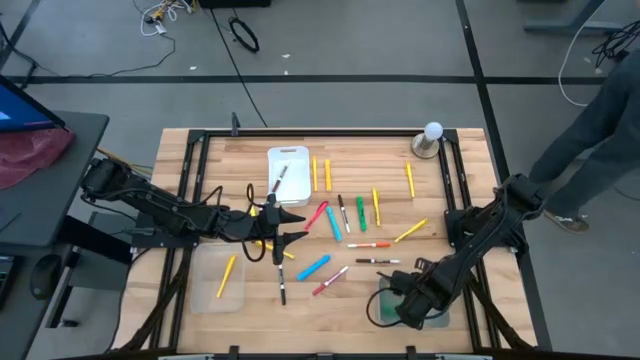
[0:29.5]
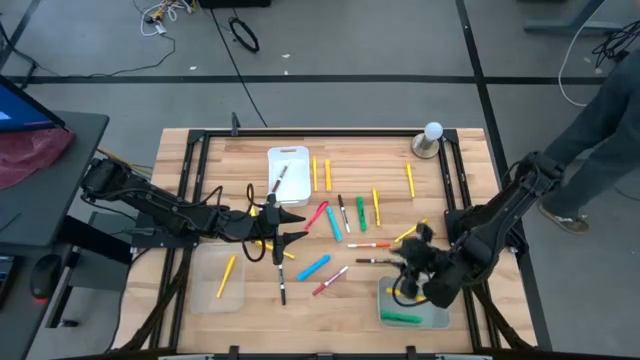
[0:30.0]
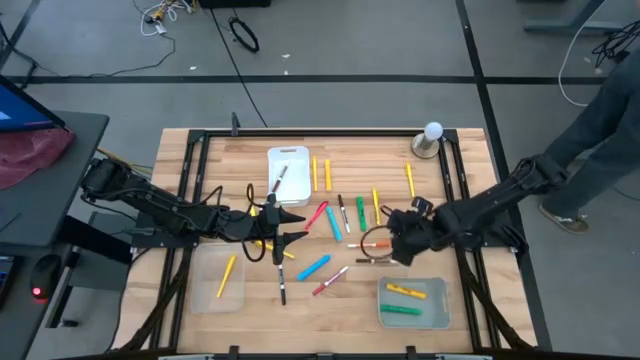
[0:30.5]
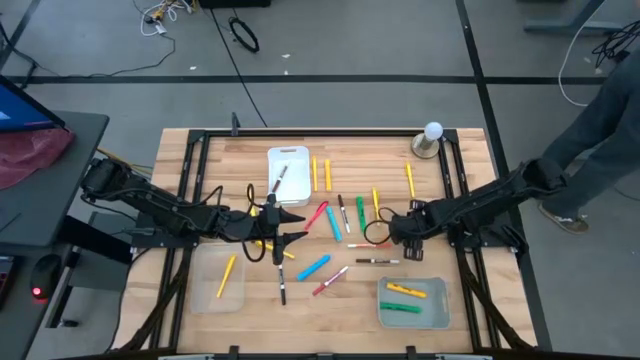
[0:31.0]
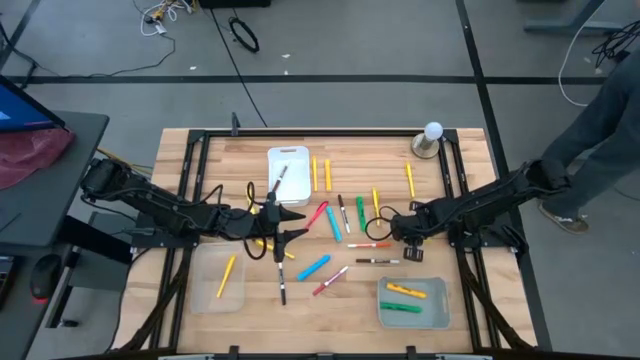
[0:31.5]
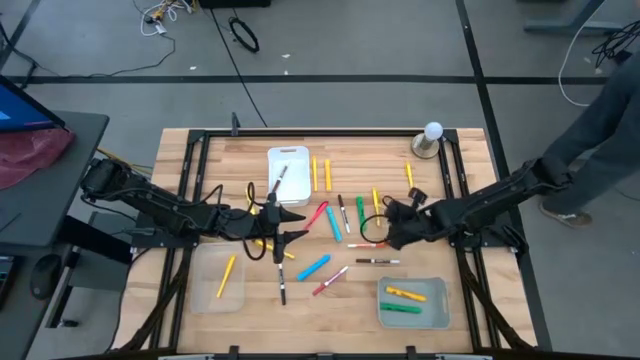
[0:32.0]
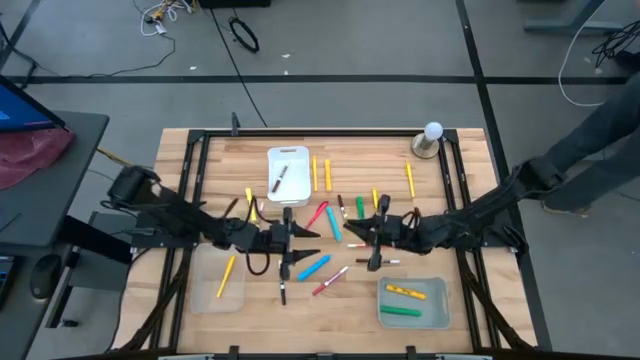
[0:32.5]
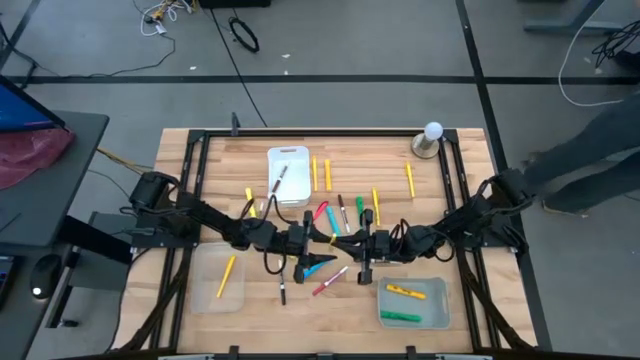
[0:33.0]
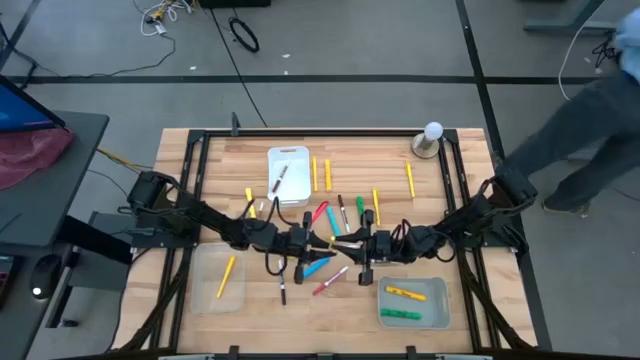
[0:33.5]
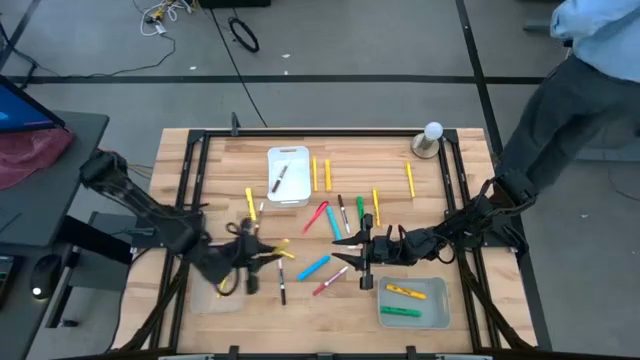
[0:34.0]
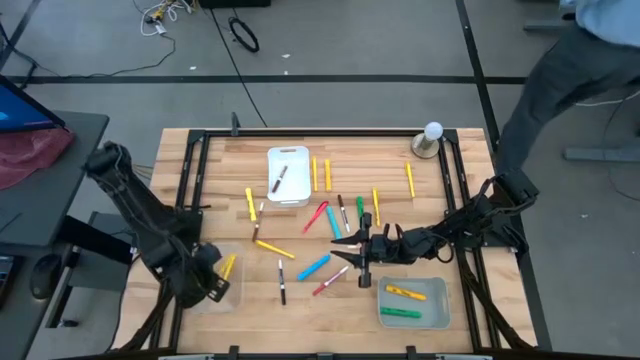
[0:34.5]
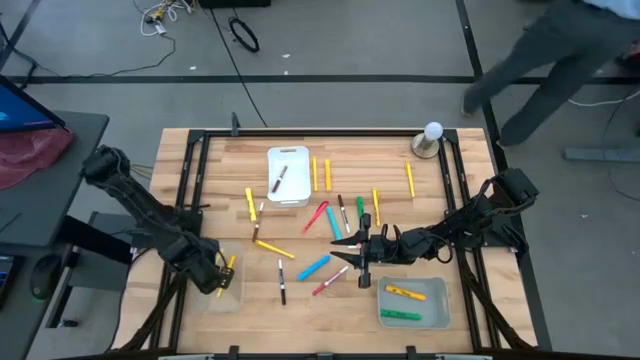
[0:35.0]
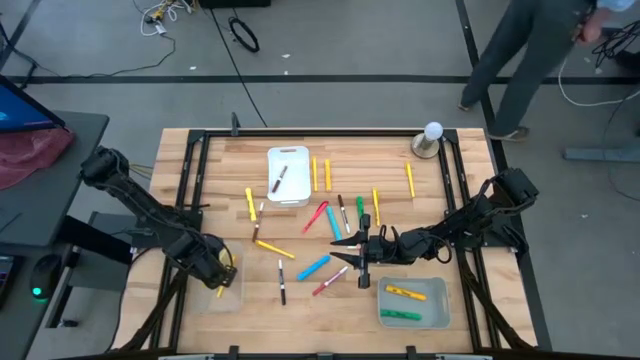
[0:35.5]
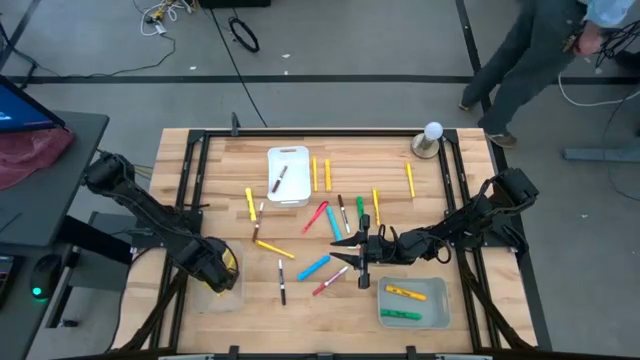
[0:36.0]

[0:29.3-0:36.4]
Task: Pick & Place Markers
Put the yellow pen into the transparent bin

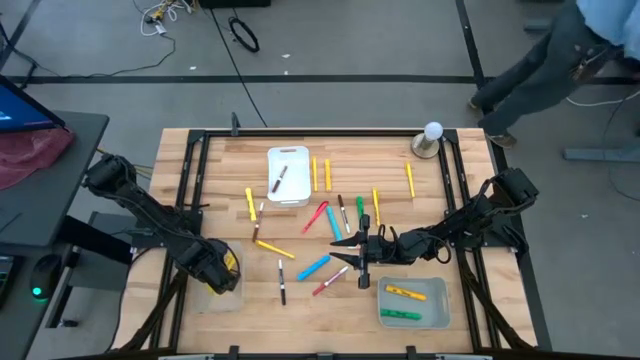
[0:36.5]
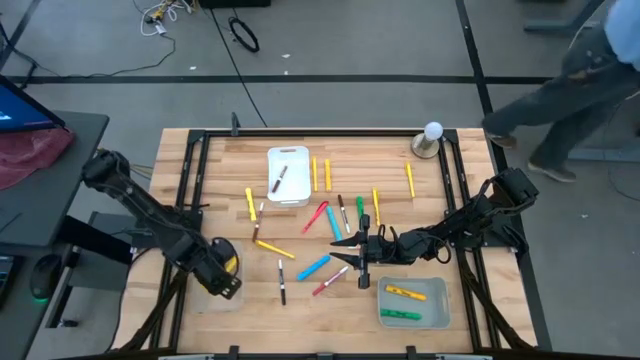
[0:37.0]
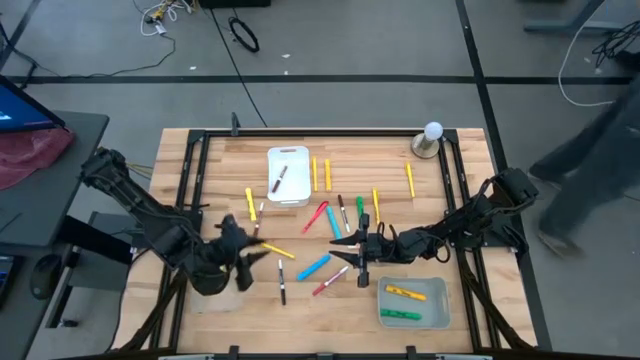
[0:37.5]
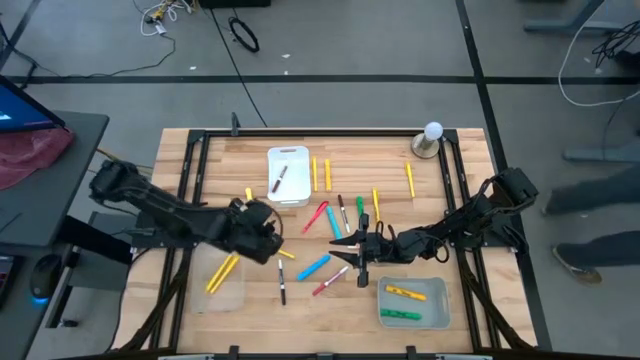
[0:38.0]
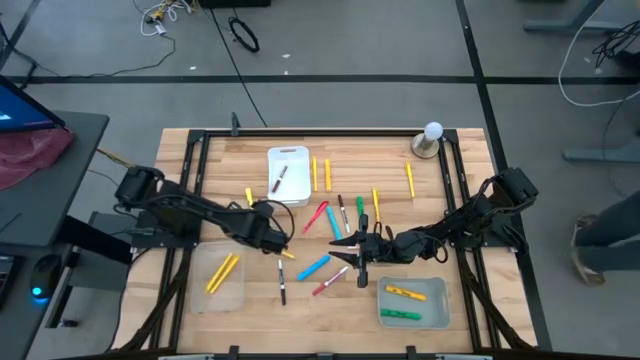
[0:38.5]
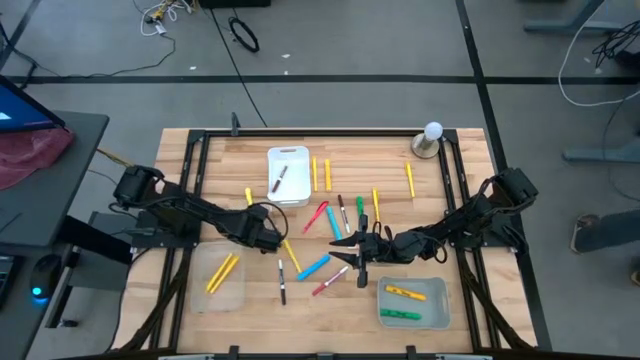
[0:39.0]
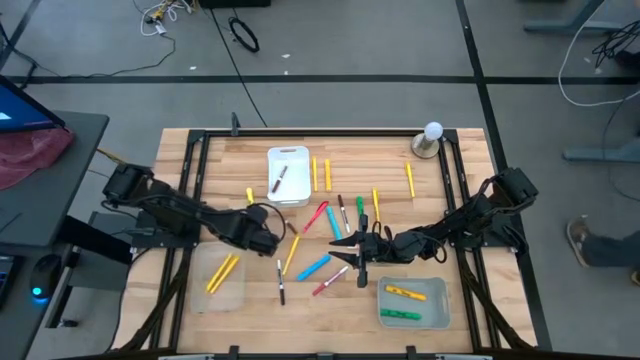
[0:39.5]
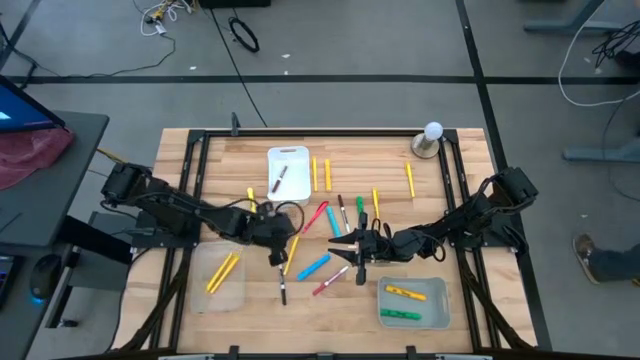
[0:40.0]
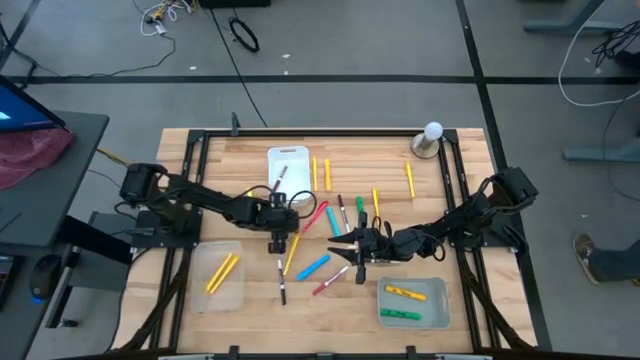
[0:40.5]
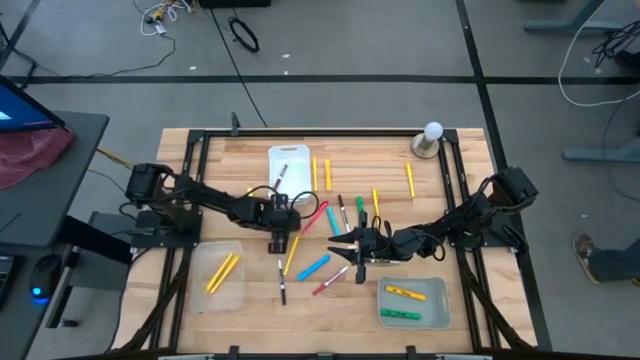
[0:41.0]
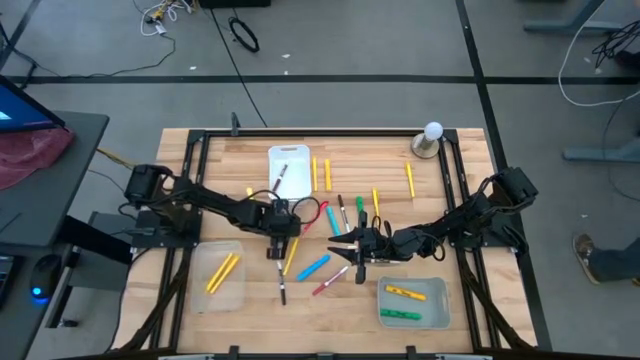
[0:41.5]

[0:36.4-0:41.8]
Put the brown marker pen into the white bin

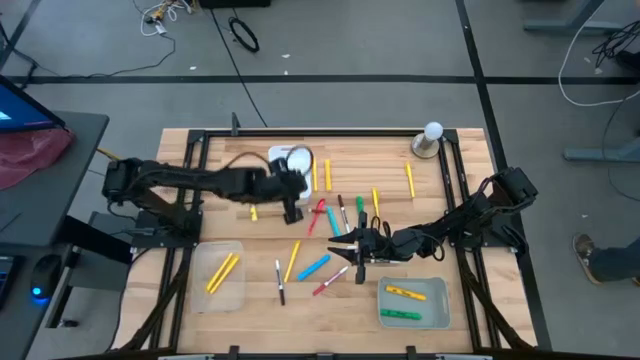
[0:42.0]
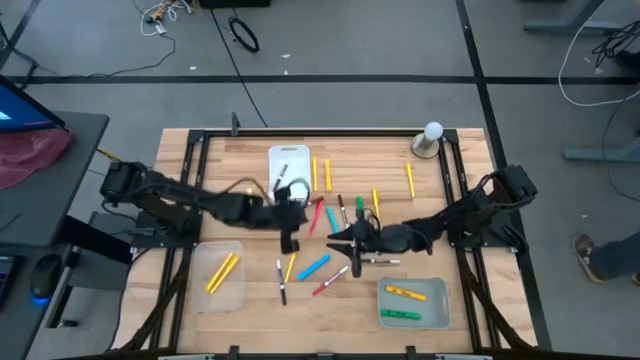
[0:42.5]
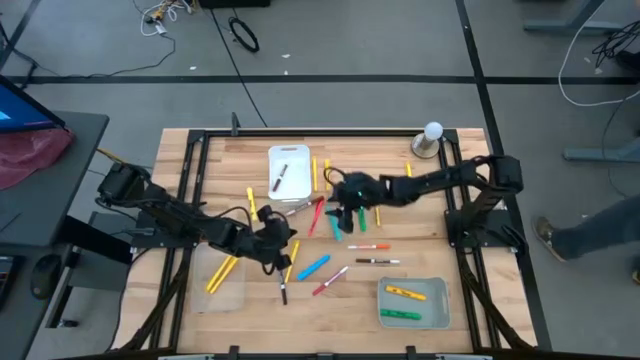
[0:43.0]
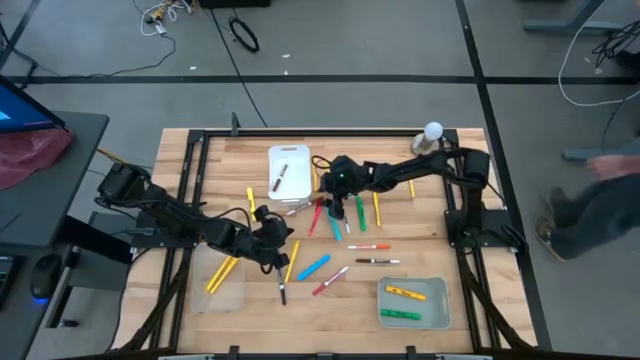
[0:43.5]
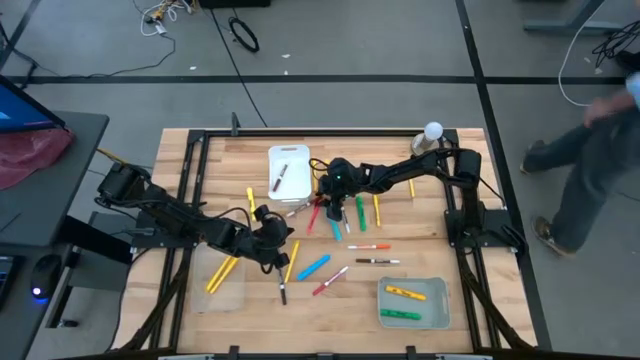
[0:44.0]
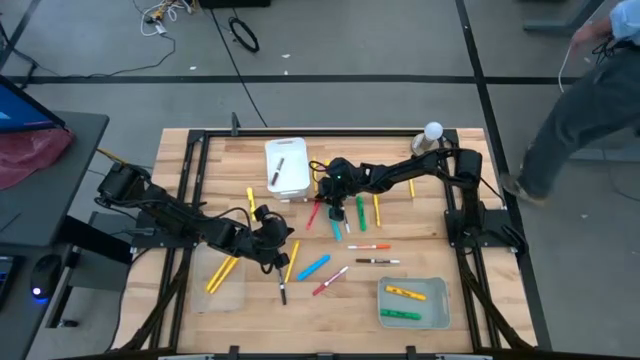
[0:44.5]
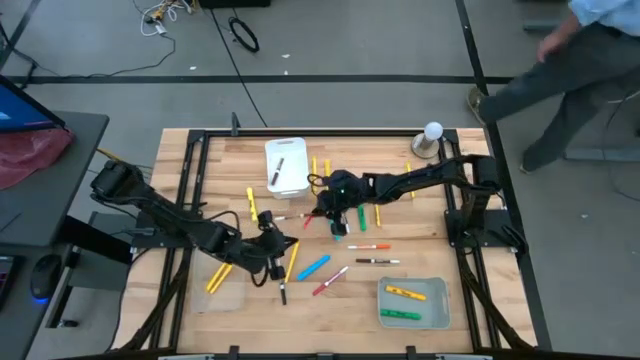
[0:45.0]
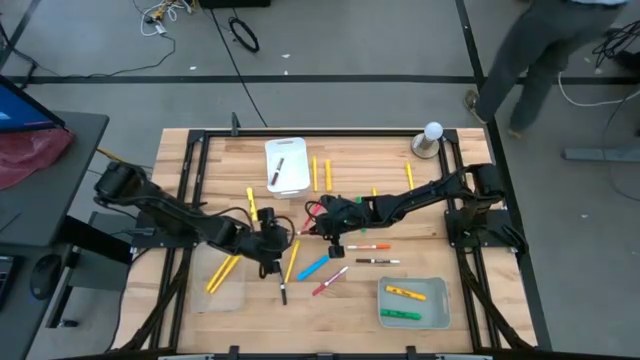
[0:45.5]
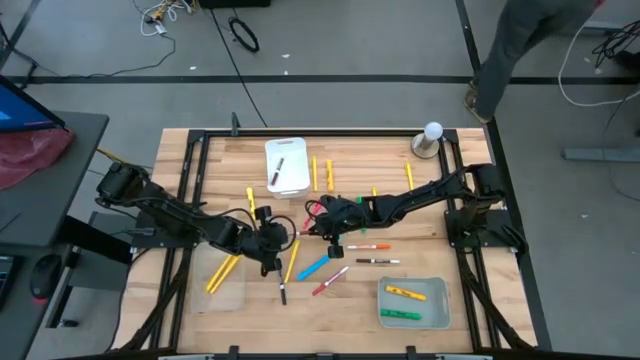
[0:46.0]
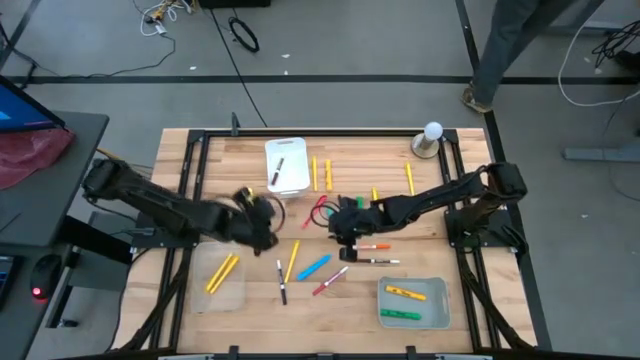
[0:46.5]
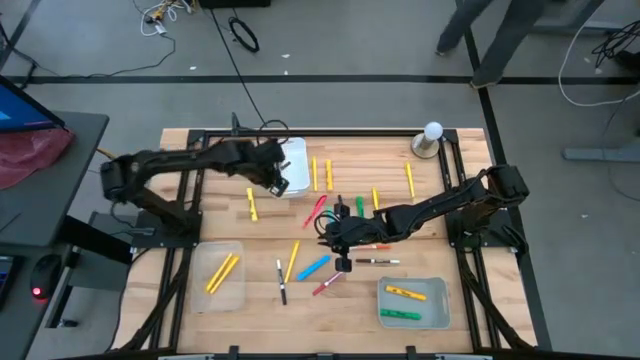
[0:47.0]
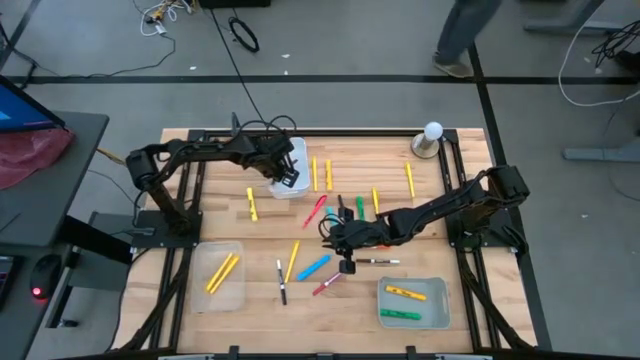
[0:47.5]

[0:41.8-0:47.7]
Put the brown marker pen into the white bin

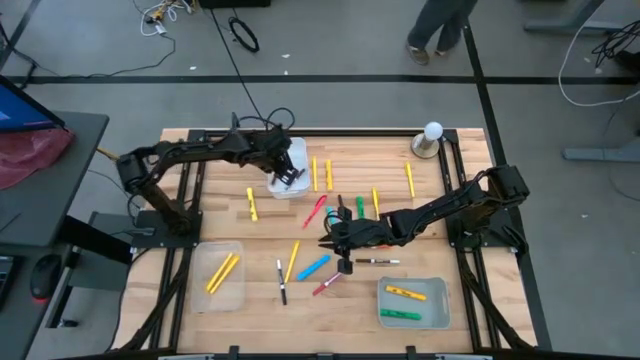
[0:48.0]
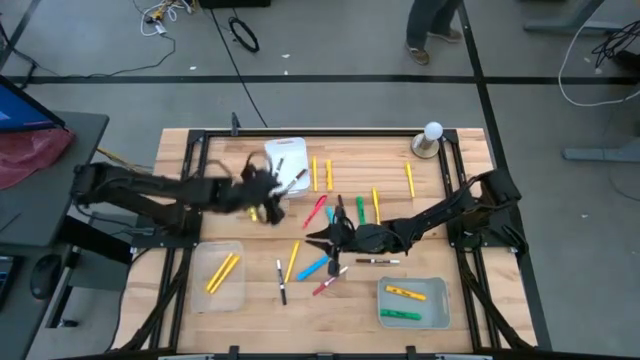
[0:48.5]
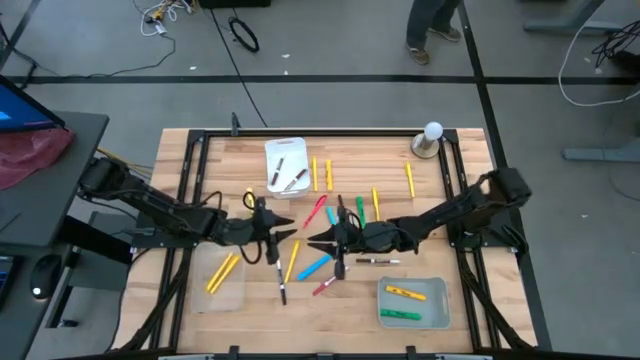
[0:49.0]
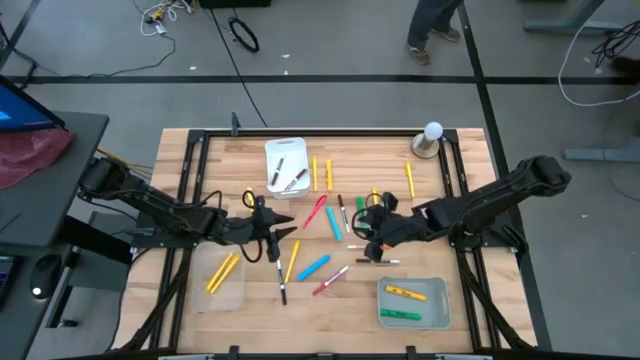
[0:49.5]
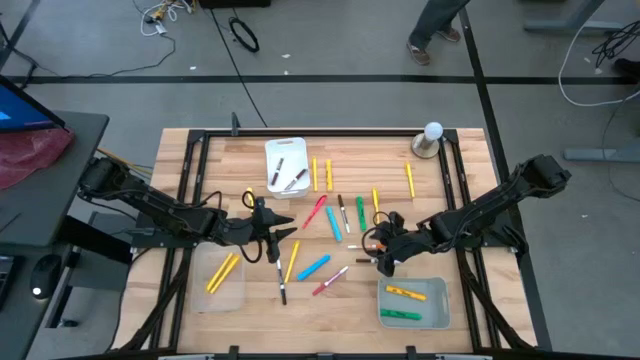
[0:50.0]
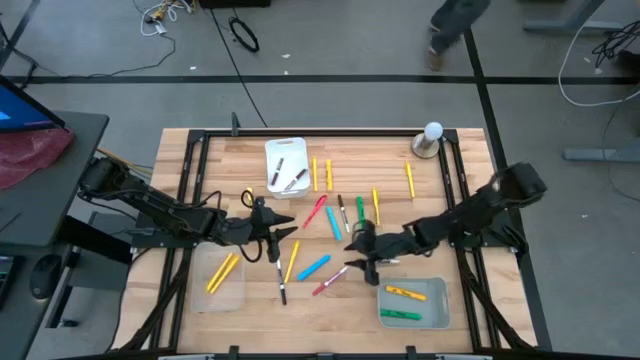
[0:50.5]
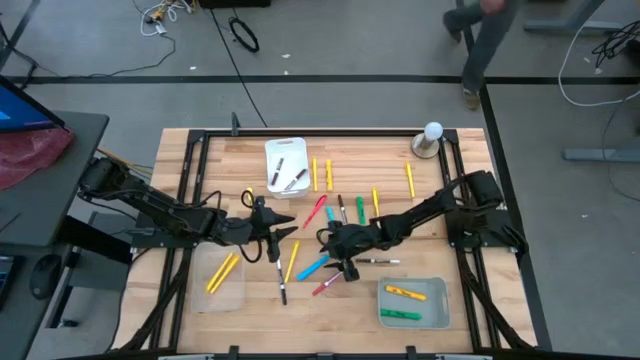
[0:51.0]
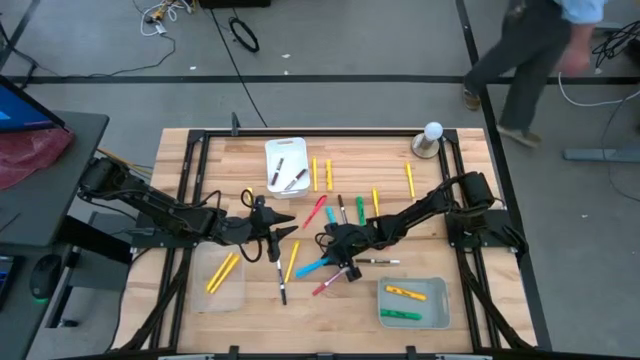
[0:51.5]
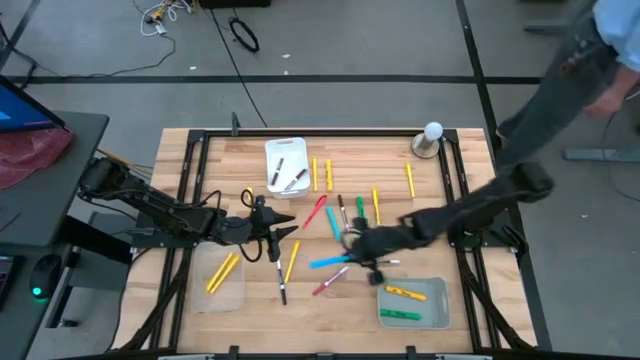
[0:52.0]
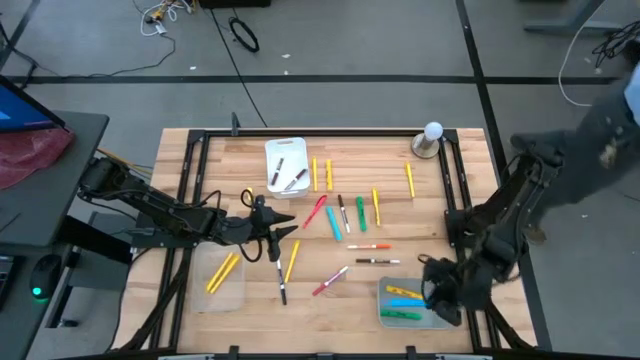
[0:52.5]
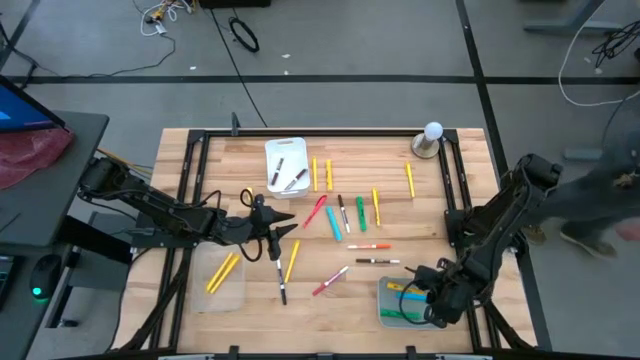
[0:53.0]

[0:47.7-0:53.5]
Put the blue highlighter pen into the gray bin
